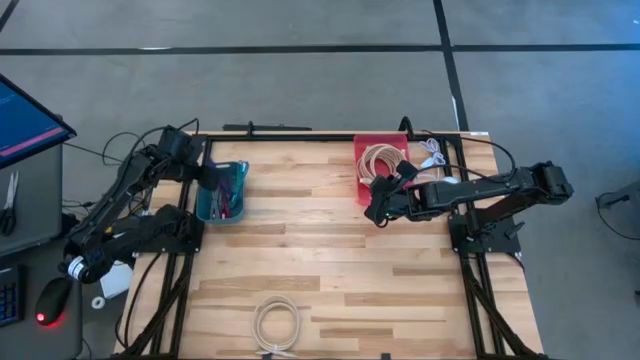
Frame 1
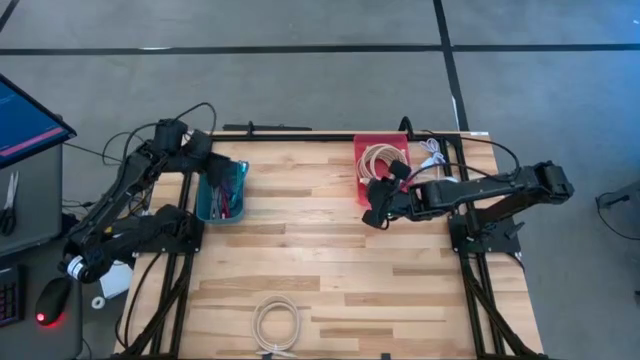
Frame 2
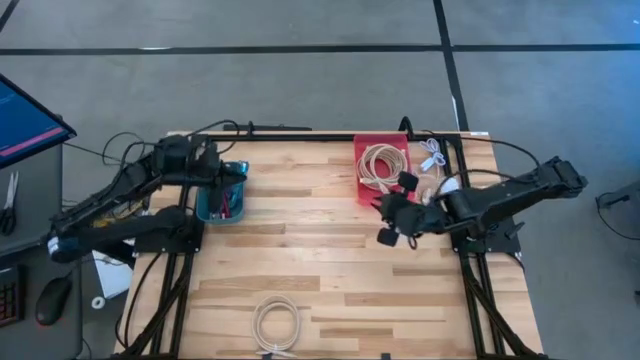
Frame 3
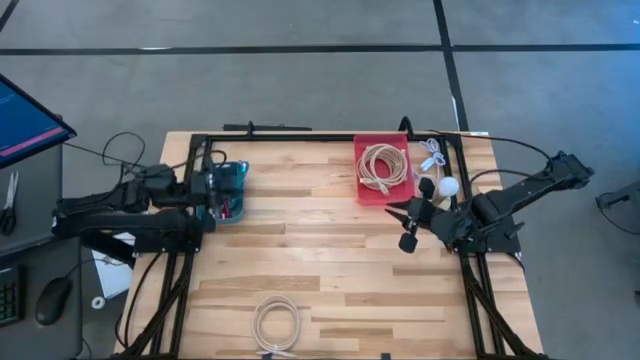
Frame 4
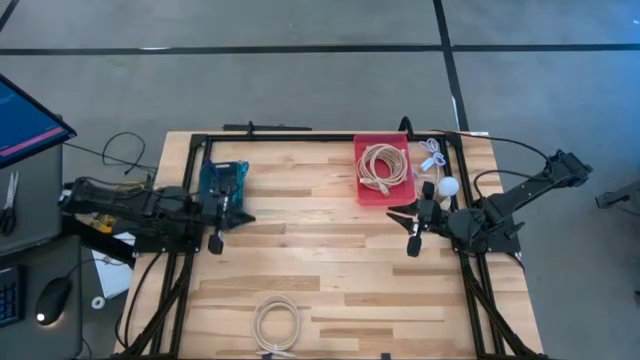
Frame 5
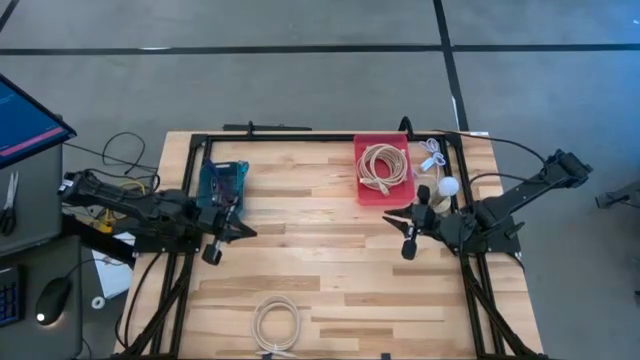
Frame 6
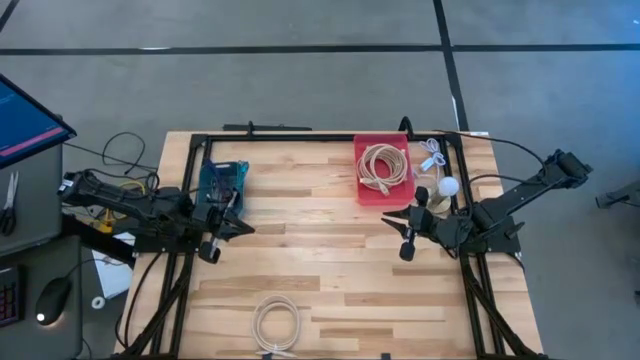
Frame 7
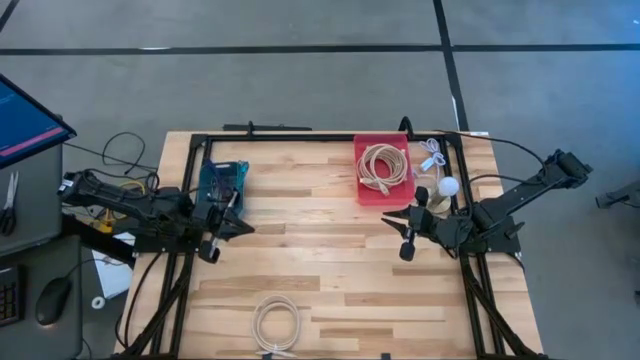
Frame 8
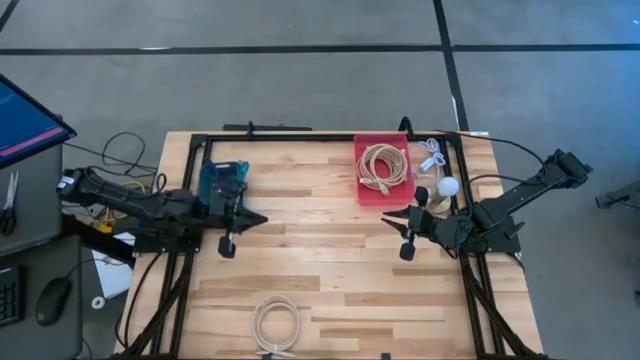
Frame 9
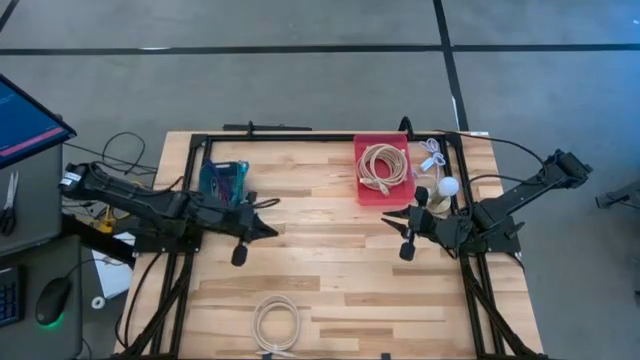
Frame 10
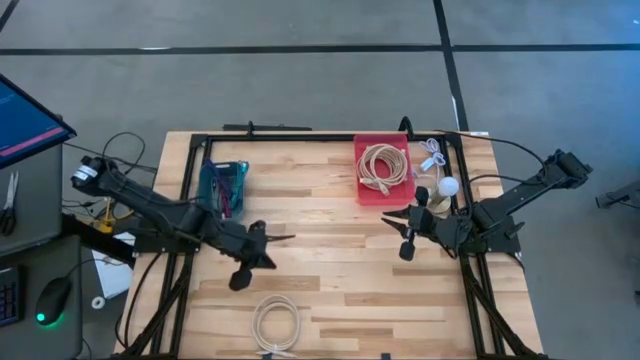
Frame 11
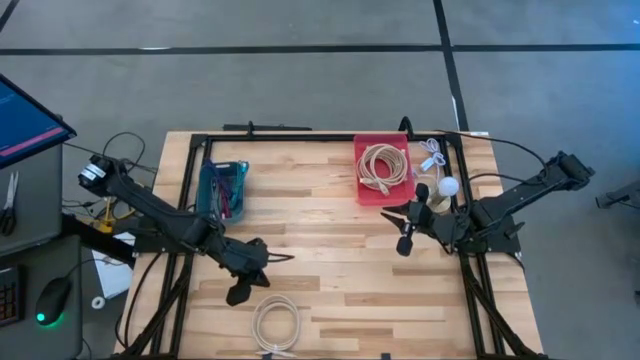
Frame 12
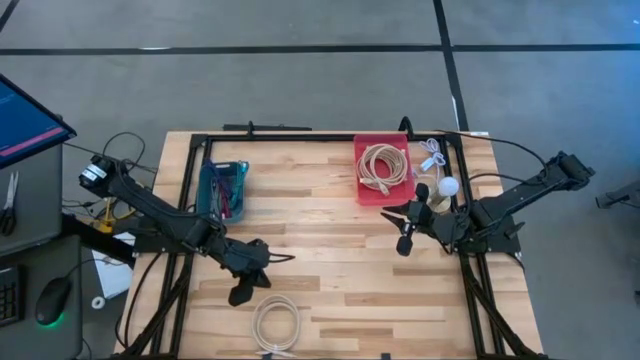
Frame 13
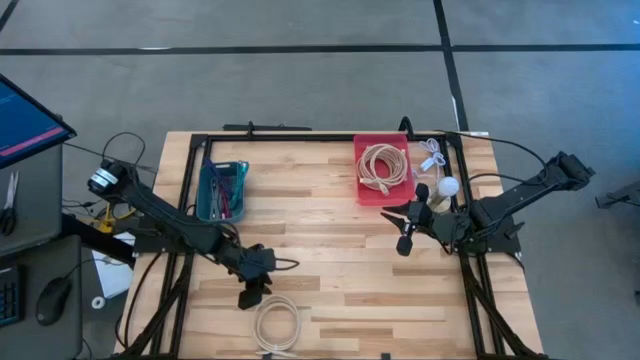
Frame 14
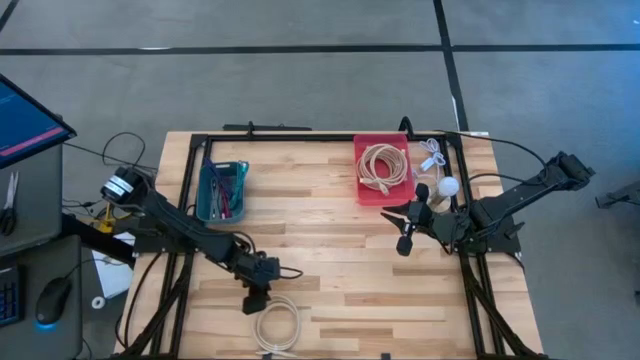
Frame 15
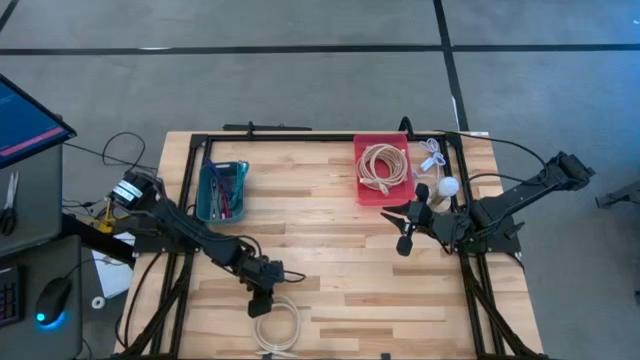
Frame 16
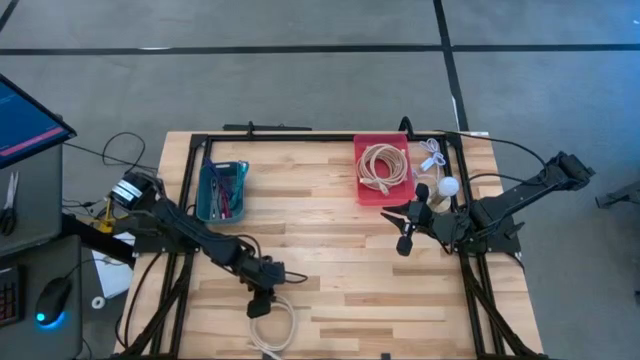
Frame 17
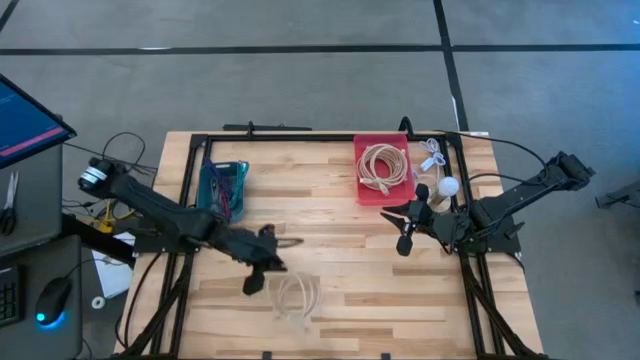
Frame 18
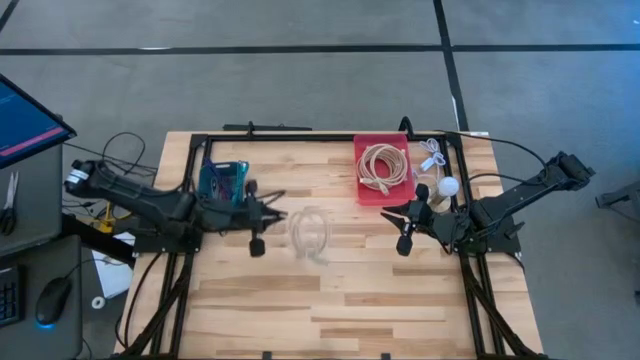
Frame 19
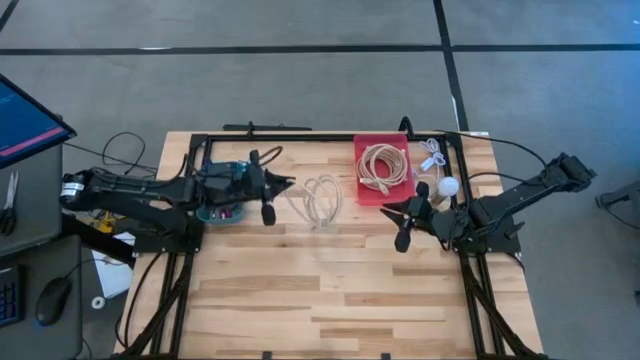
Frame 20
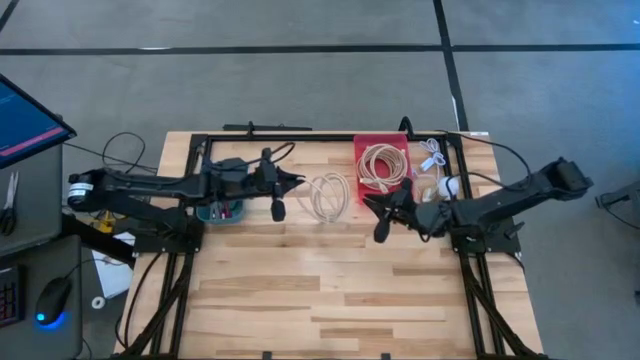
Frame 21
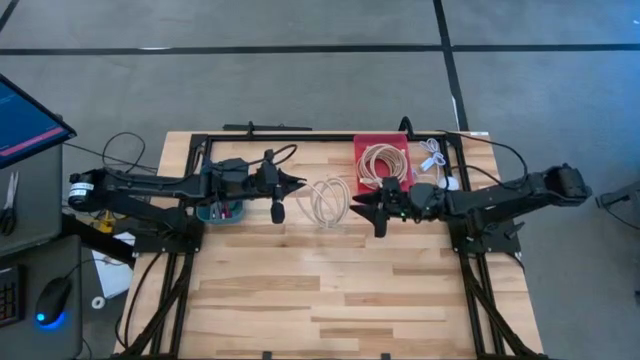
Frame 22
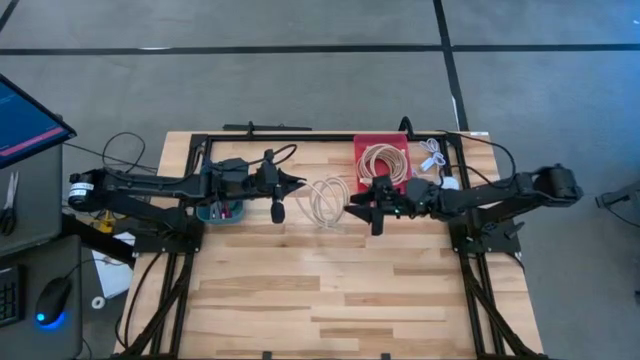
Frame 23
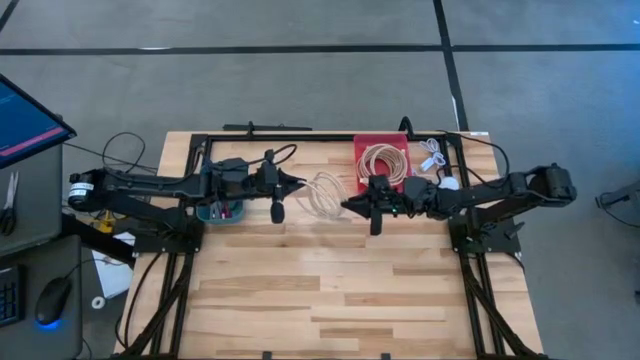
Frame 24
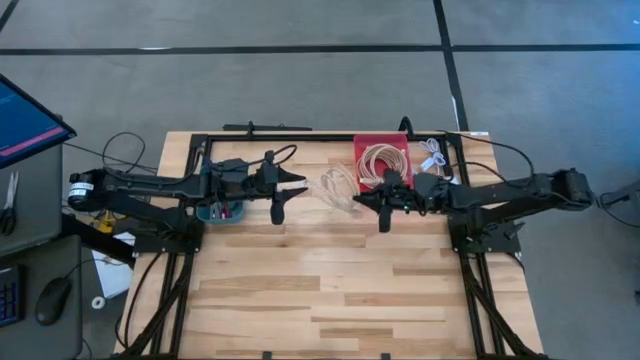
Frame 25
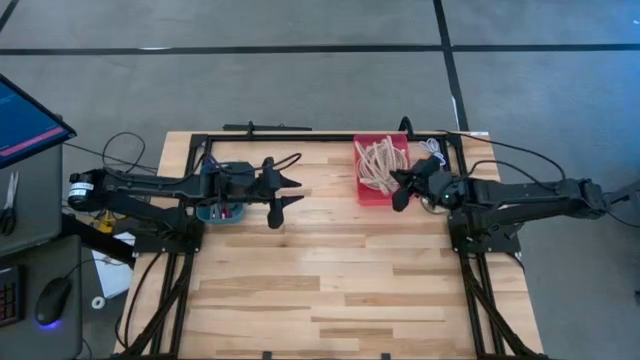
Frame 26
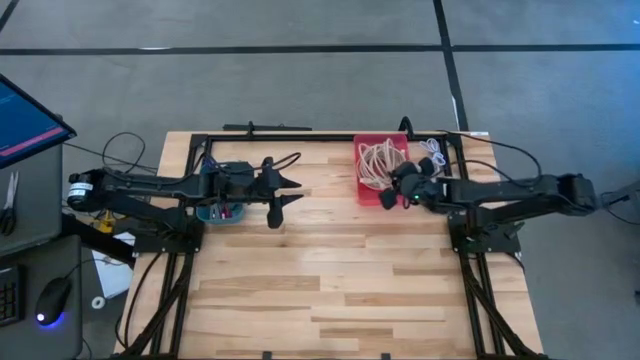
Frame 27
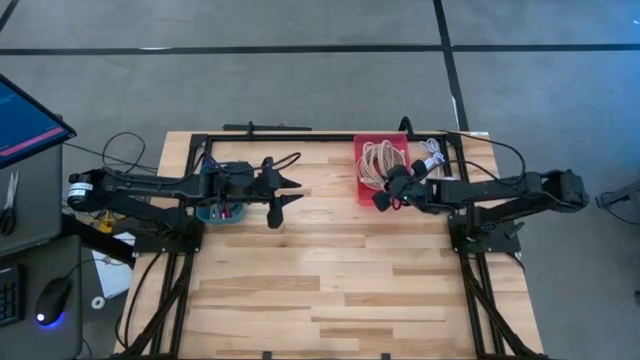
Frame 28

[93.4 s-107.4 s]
Task: Pick & Place USB Port
Put the brown display cable in the pink bin

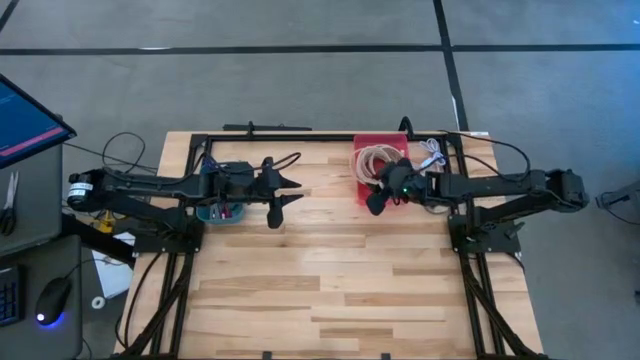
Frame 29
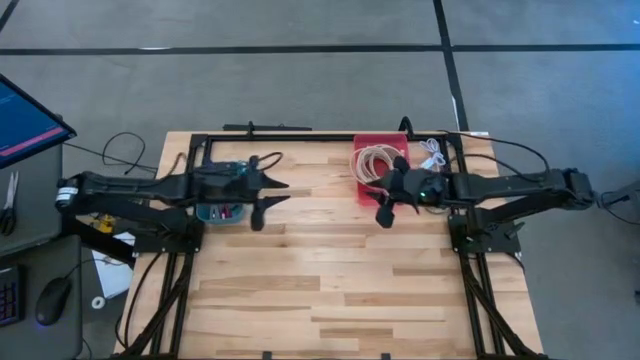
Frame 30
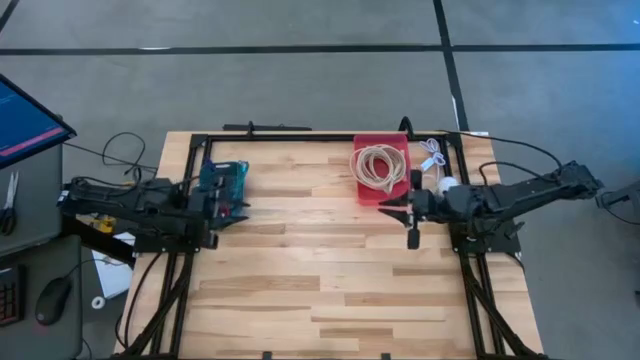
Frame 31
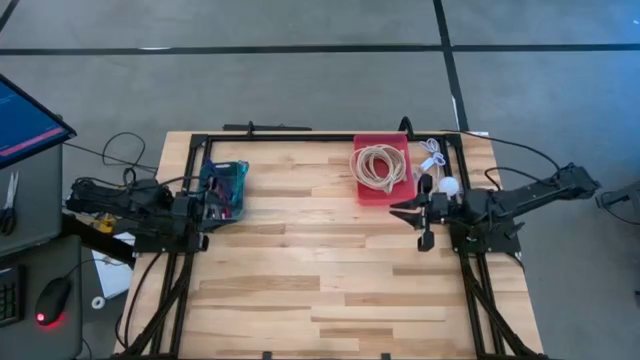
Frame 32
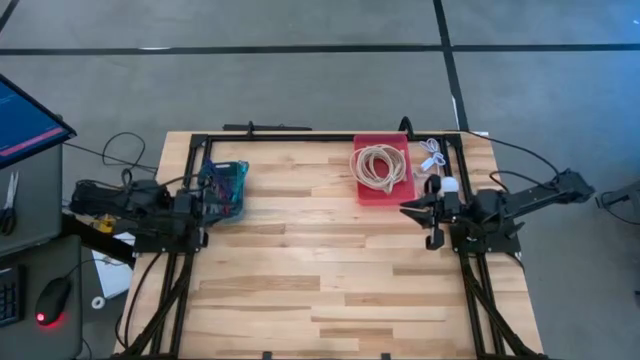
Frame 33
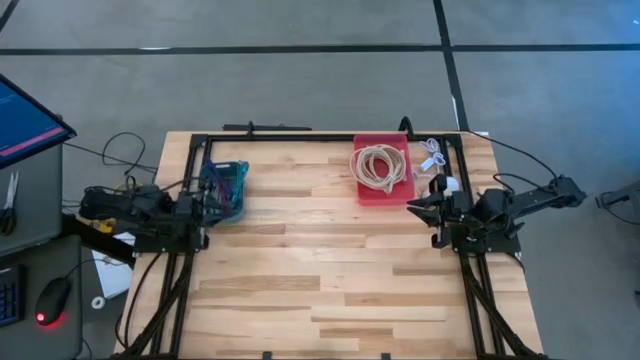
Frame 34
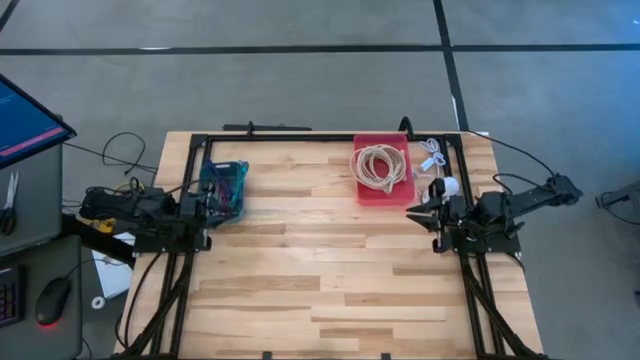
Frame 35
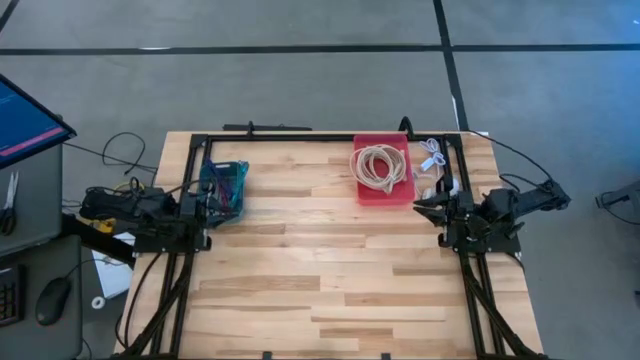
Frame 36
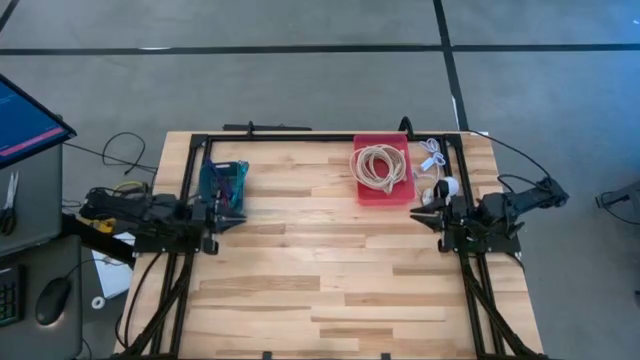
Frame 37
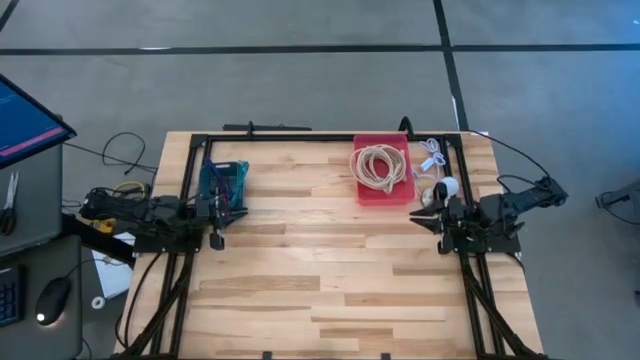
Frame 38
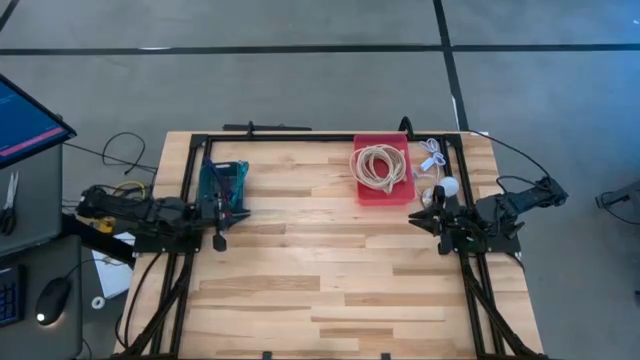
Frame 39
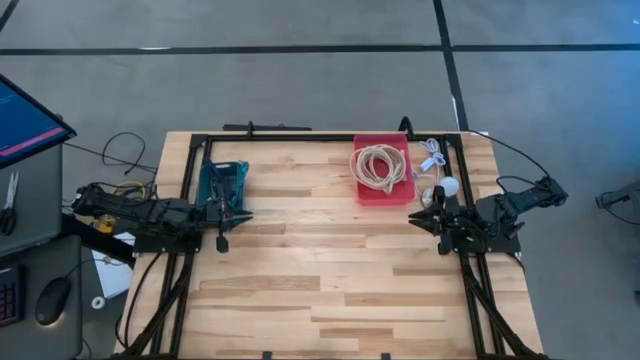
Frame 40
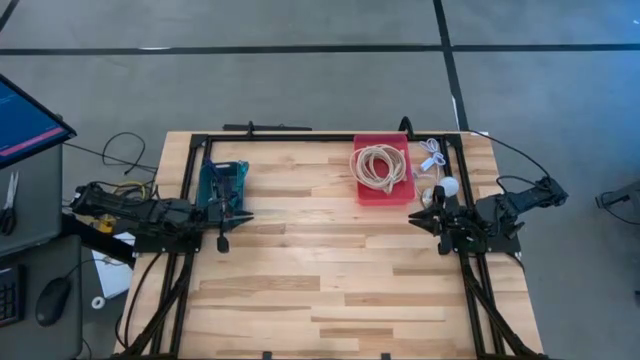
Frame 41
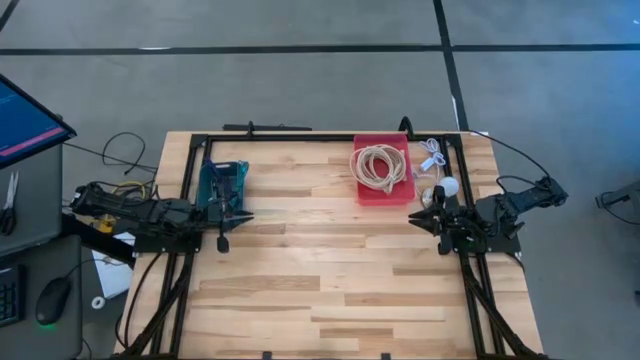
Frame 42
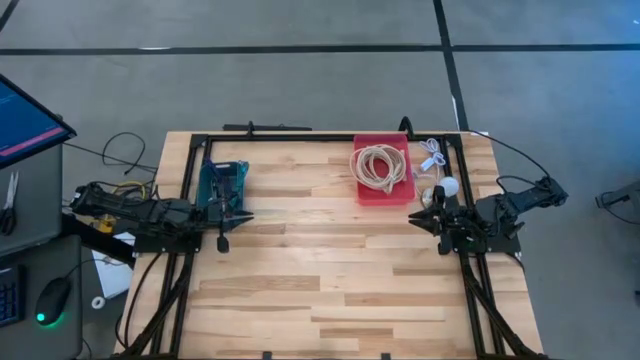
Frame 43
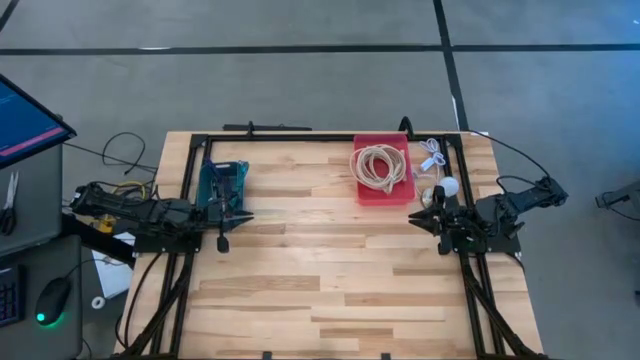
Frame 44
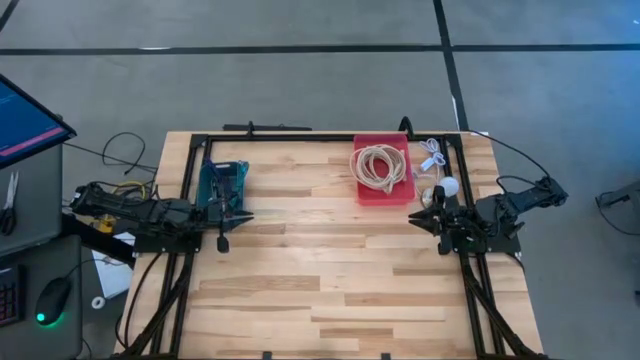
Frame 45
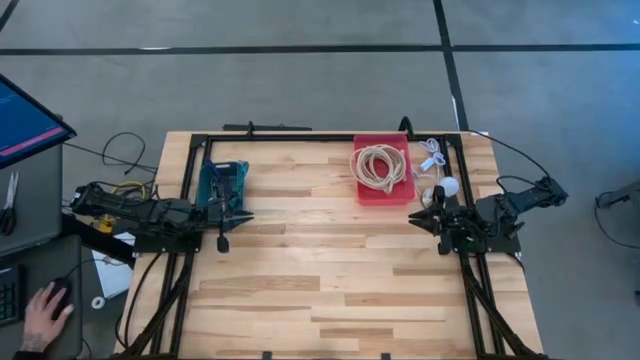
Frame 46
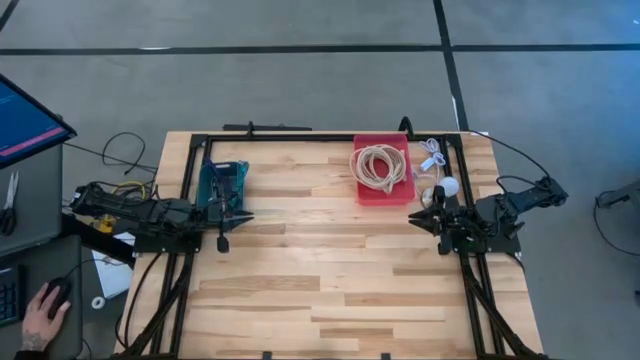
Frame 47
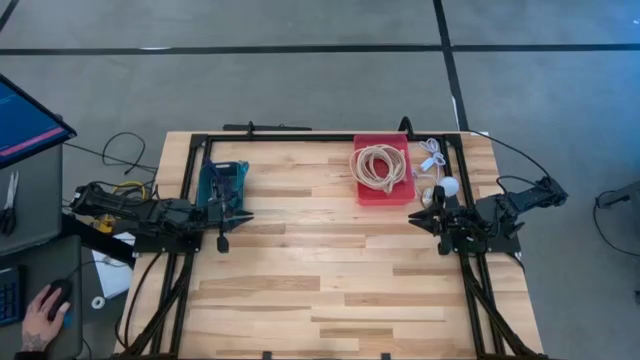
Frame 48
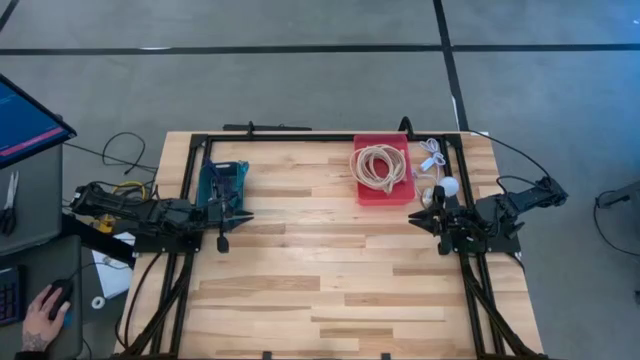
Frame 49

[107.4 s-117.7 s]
Return to Home Position
